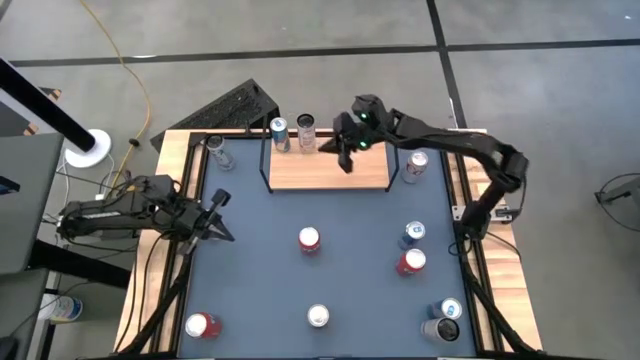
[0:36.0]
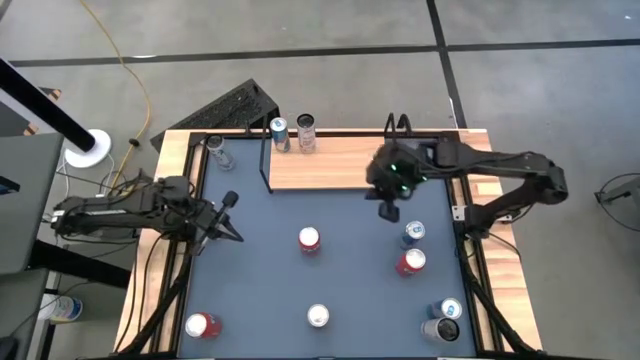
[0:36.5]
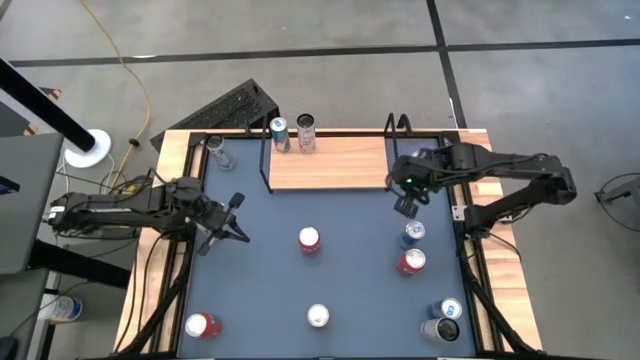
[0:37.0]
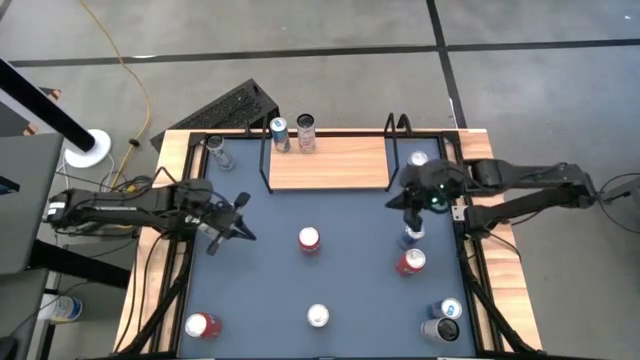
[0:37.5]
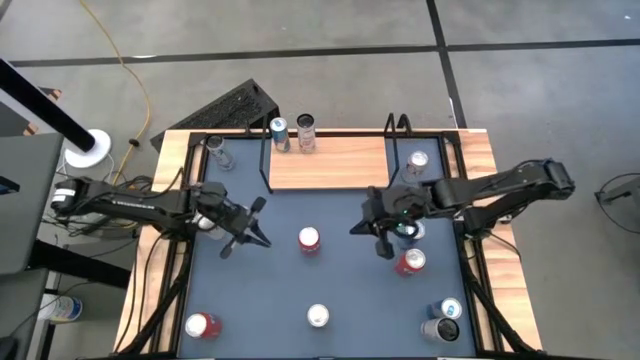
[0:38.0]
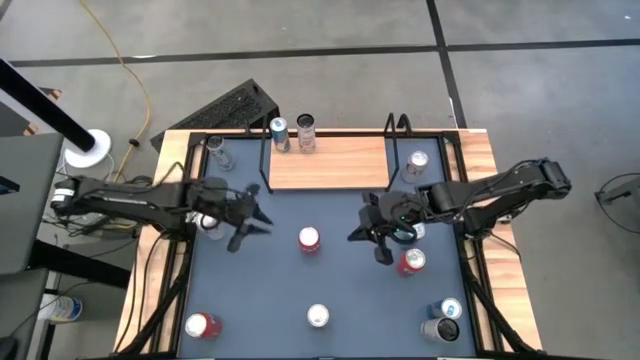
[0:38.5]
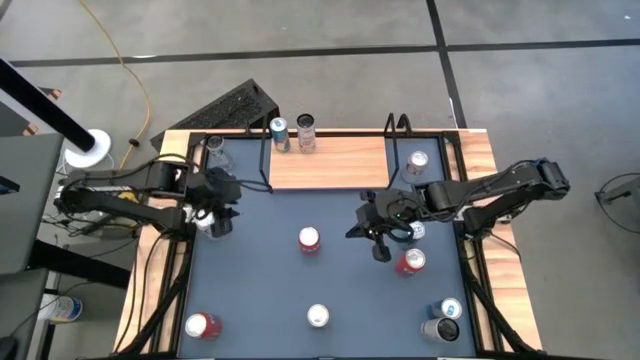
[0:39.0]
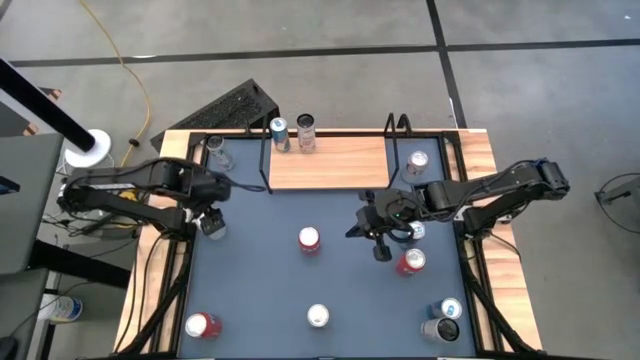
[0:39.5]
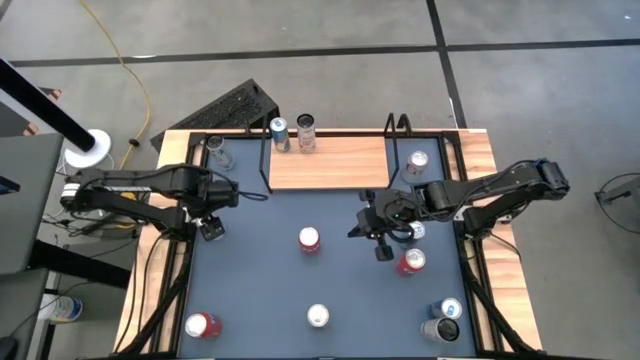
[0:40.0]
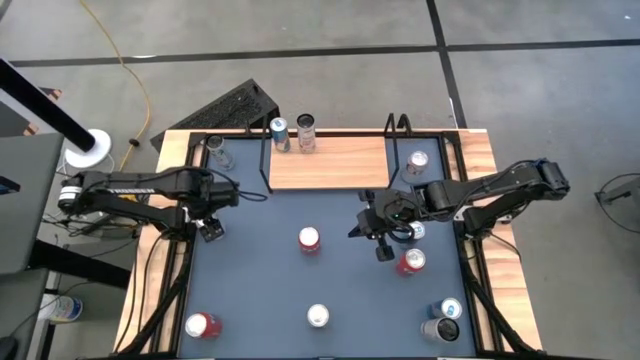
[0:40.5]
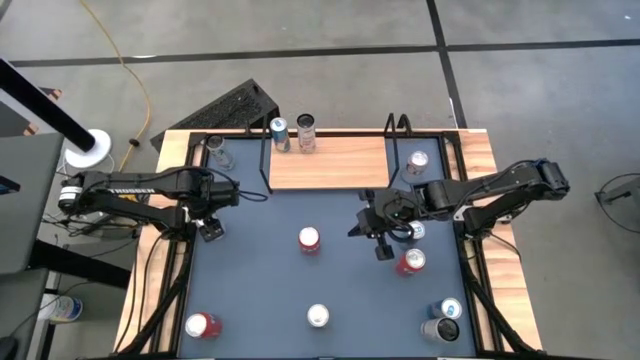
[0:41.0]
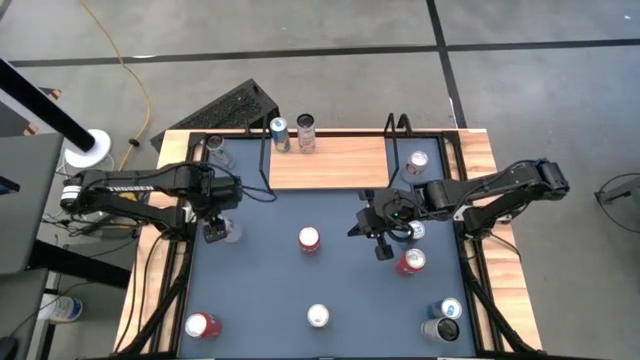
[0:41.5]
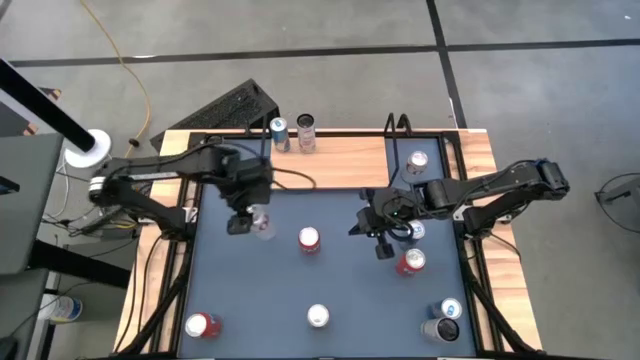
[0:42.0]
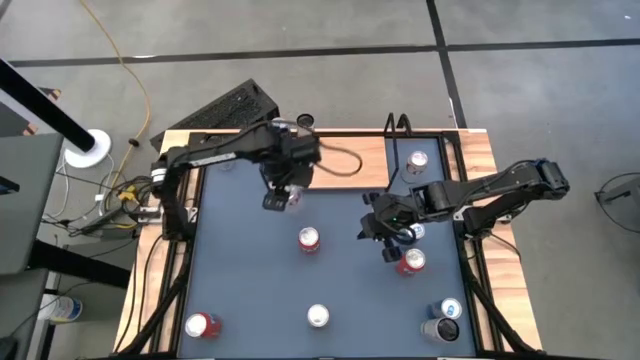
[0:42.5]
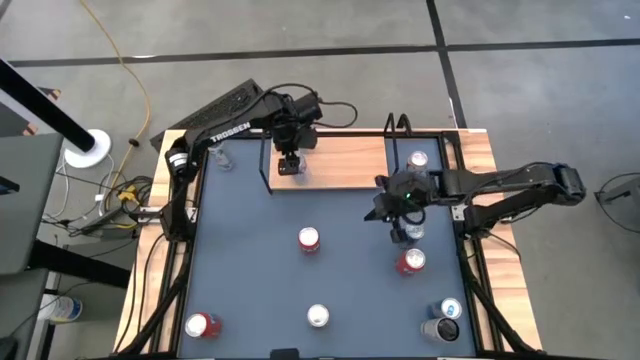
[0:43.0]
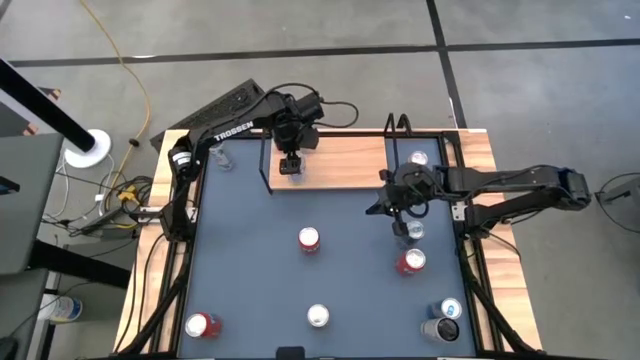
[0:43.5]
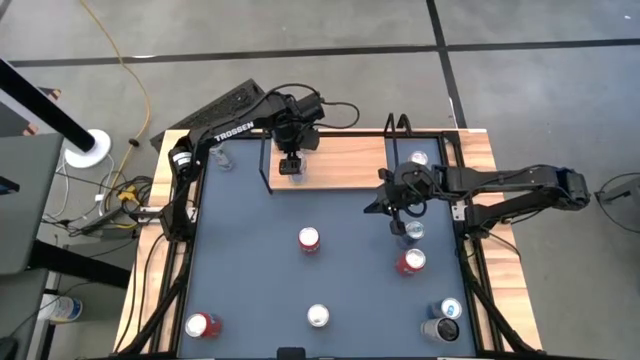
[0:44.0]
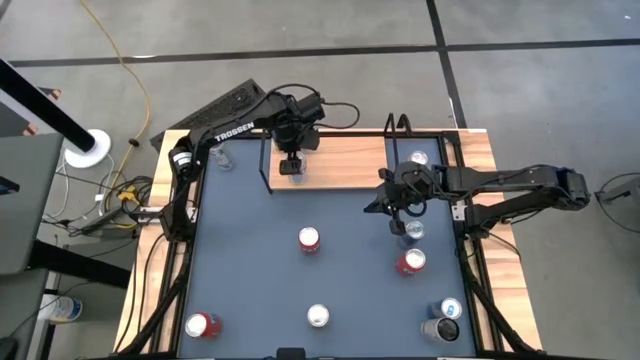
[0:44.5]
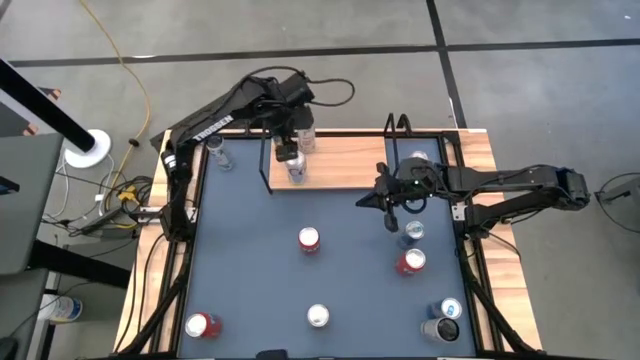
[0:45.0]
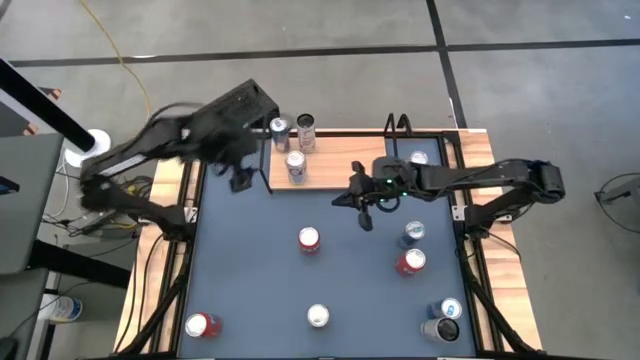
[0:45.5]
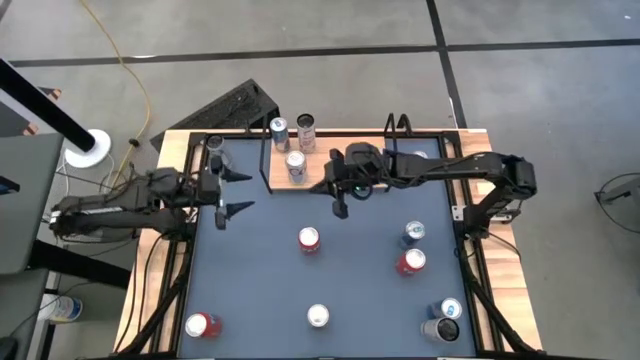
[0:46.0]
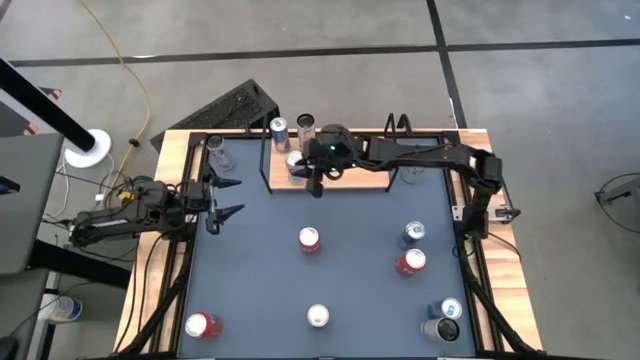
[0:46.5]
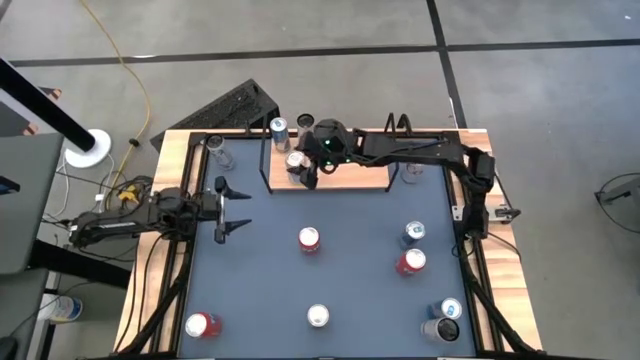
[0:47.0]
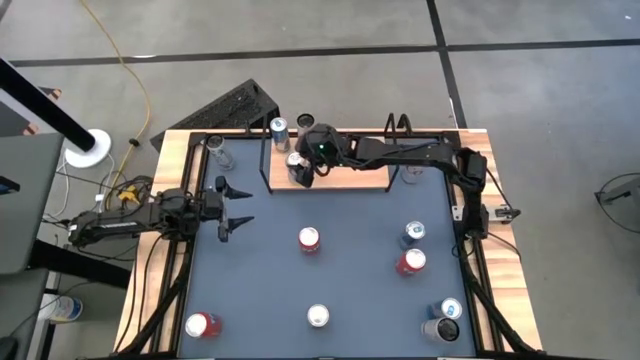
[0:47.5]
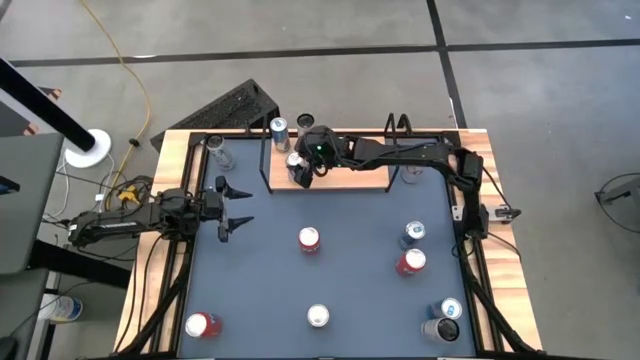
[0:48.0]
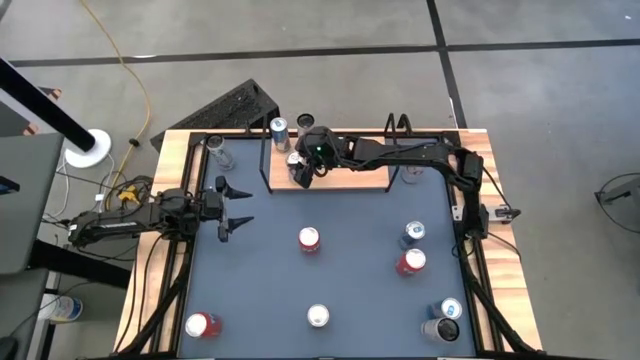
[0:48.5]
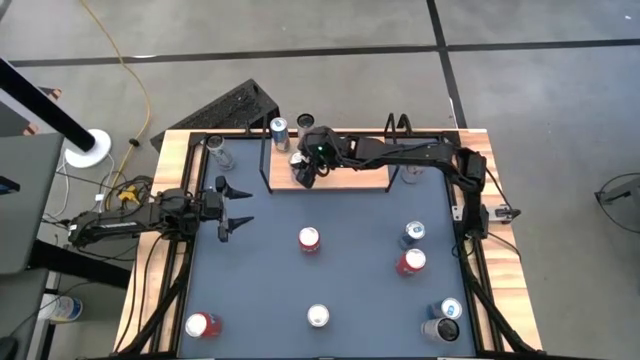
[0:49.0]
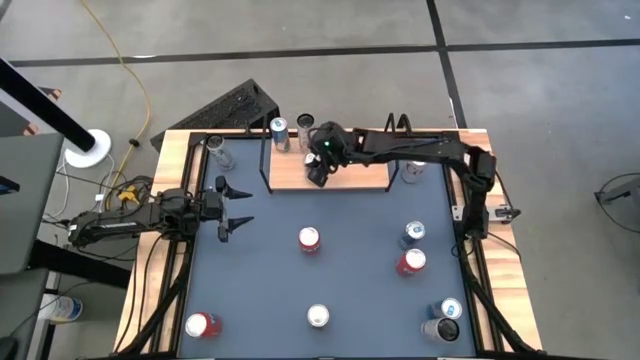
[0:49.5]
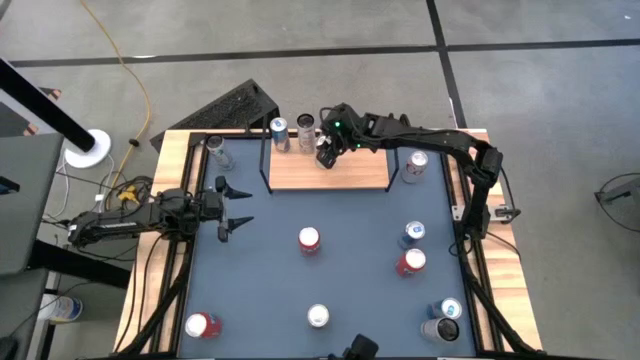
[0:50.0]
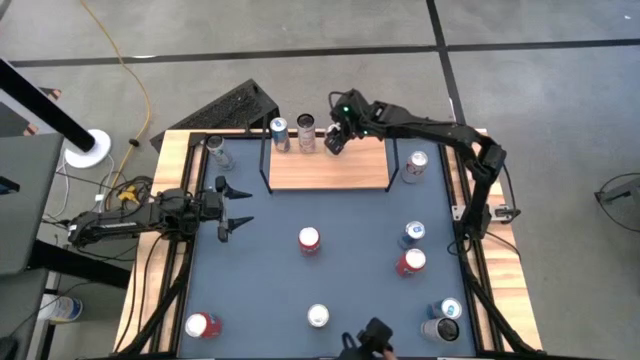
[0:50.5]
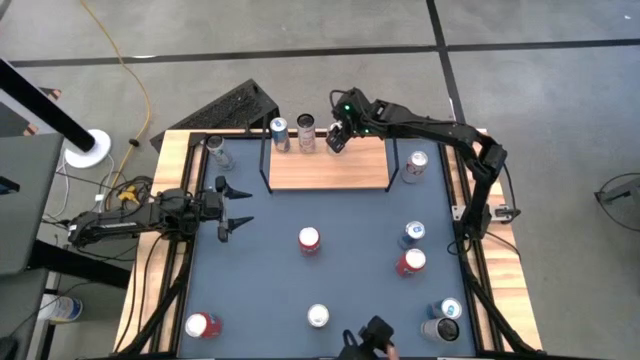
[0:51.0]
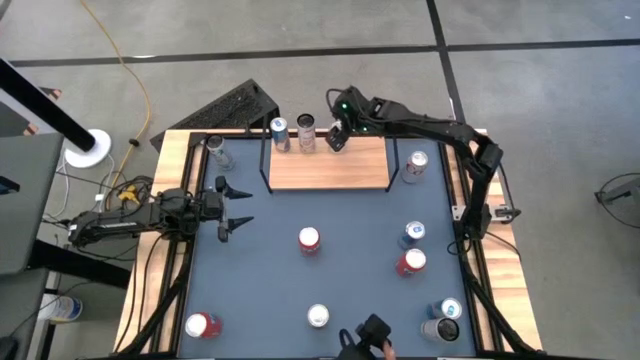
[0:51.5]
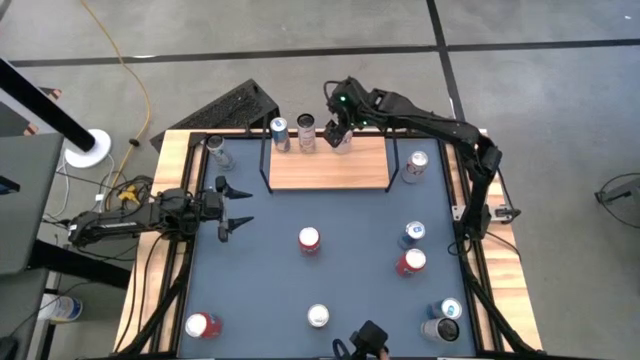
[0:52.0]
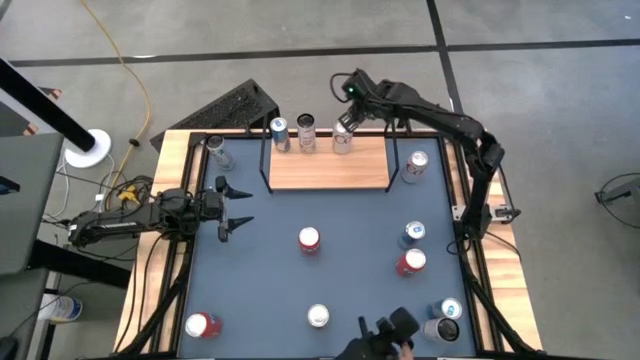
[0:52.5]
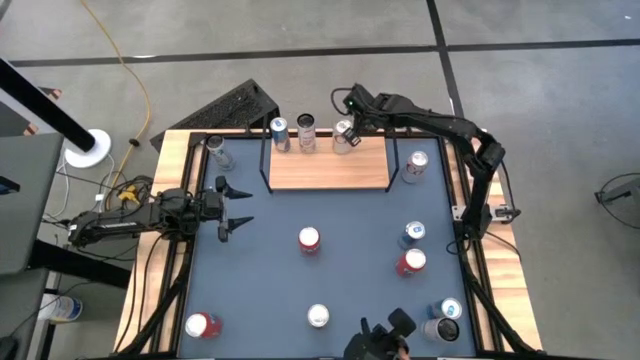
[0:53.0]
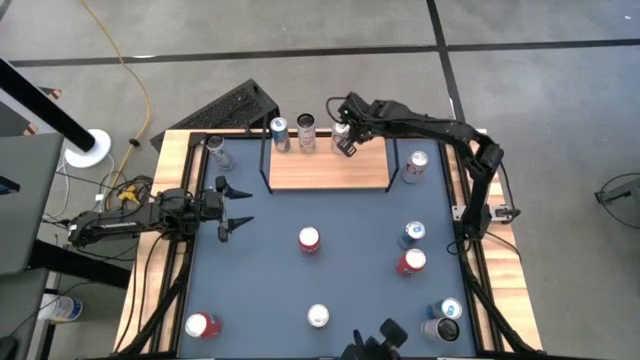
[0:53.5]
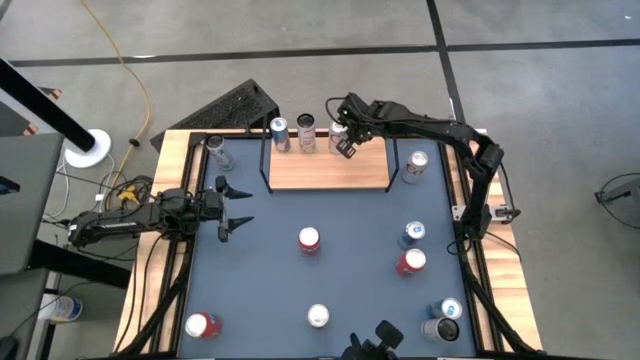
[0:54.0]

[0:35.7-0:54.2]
Task: Place canned beverage on shelf
Put the top left silver soda can on the shelf
